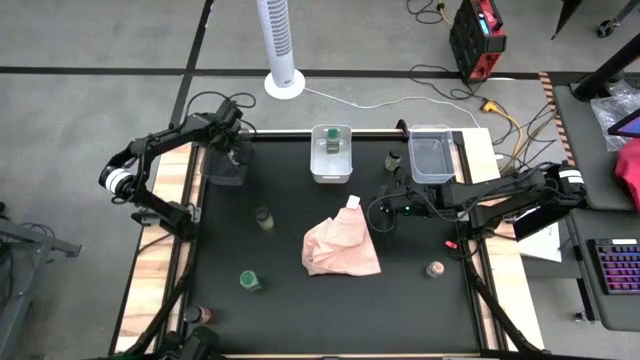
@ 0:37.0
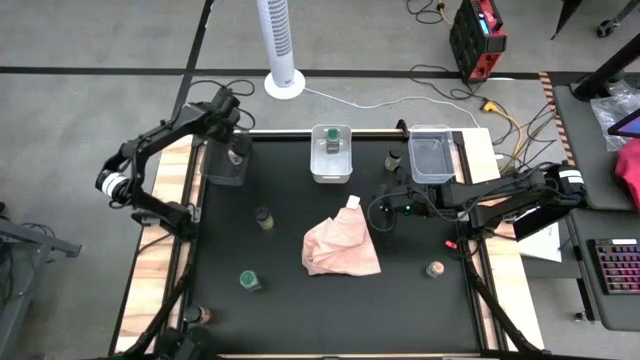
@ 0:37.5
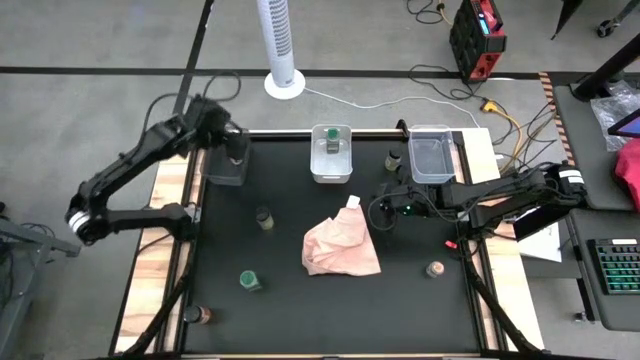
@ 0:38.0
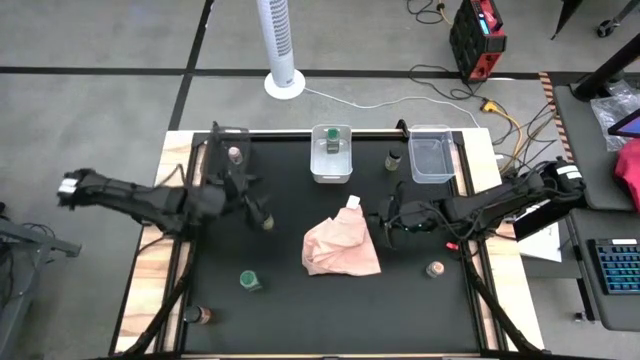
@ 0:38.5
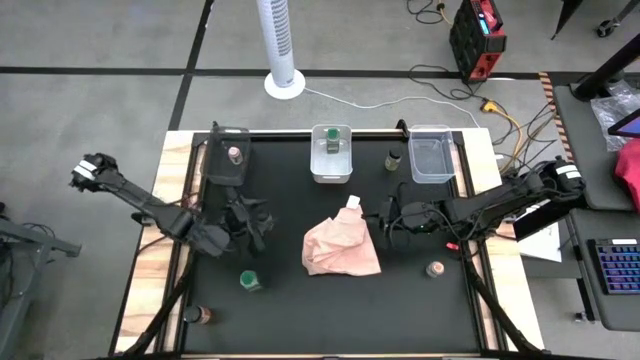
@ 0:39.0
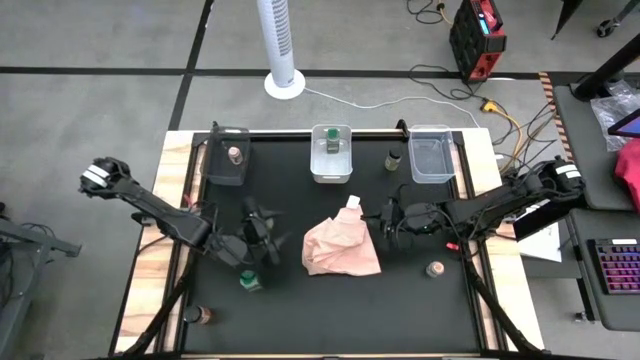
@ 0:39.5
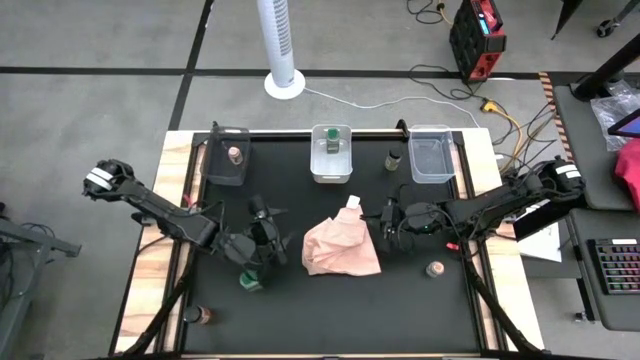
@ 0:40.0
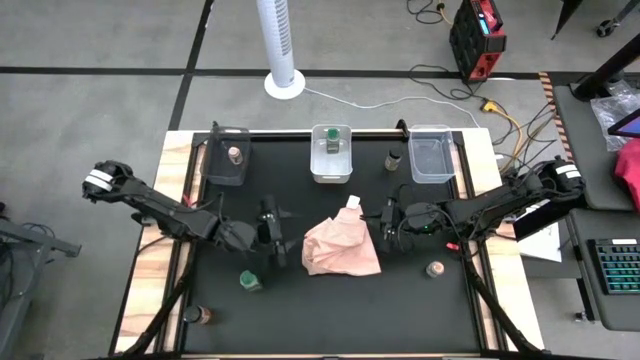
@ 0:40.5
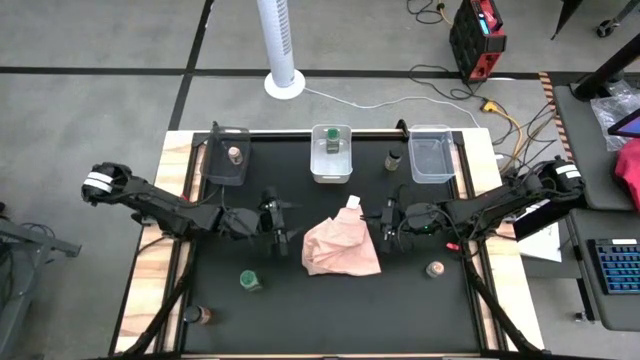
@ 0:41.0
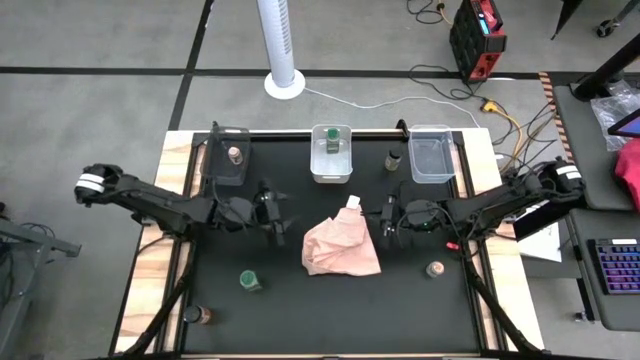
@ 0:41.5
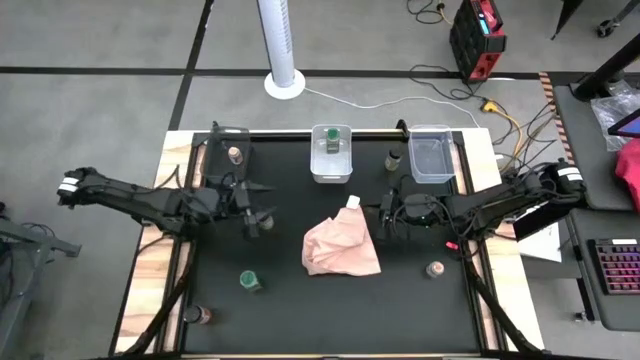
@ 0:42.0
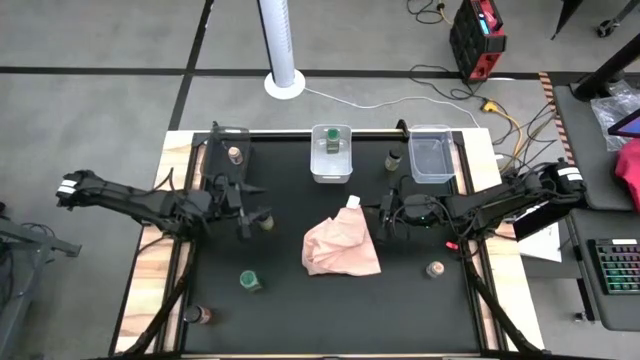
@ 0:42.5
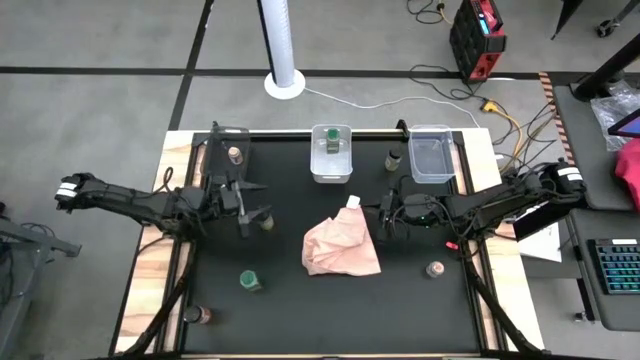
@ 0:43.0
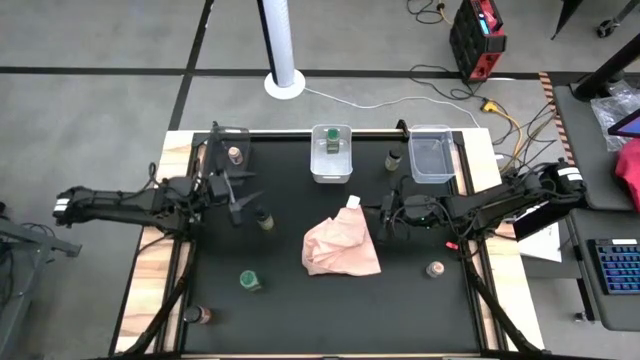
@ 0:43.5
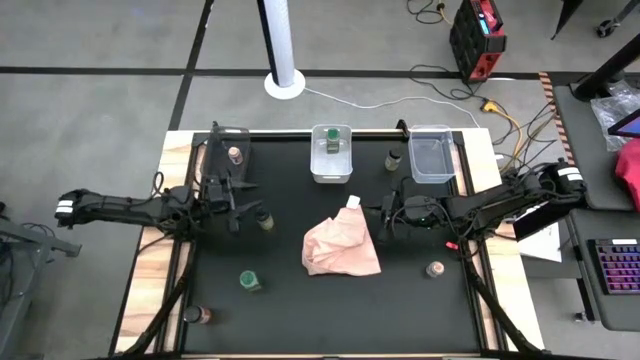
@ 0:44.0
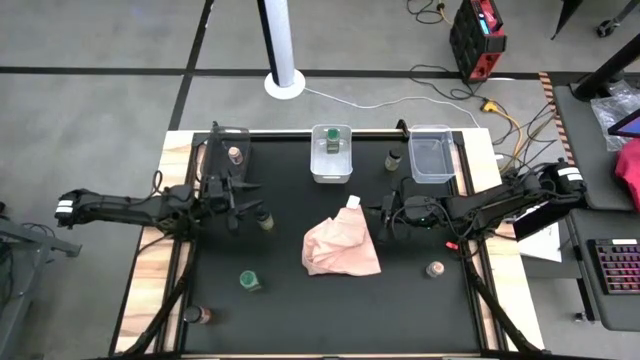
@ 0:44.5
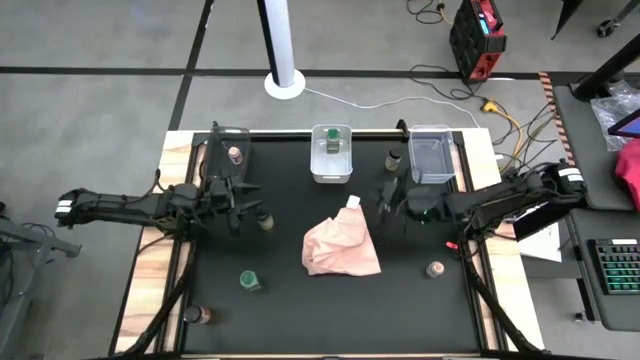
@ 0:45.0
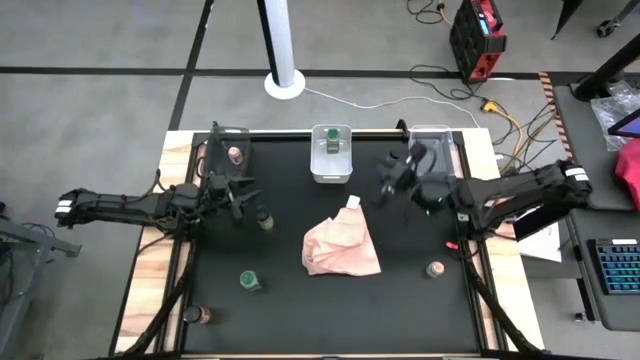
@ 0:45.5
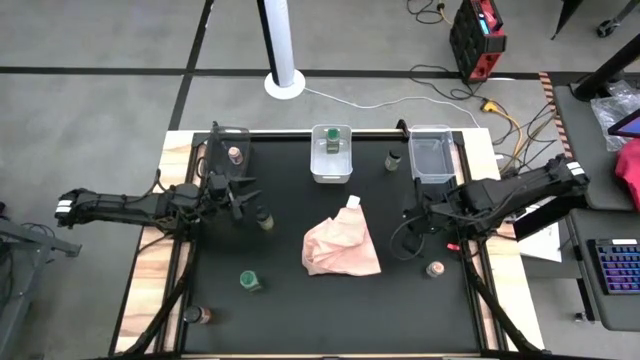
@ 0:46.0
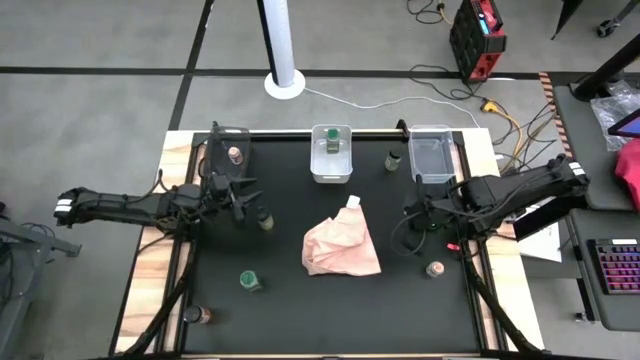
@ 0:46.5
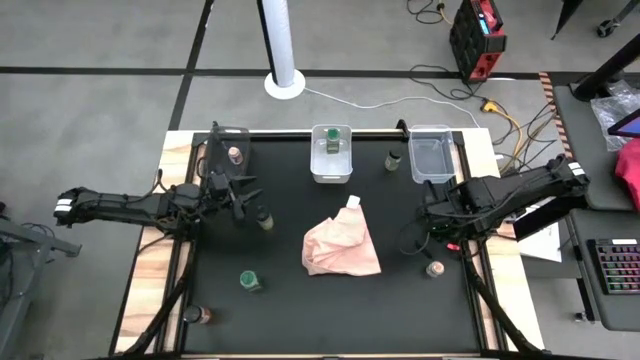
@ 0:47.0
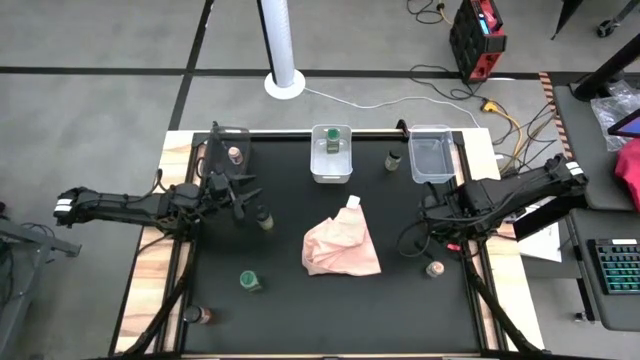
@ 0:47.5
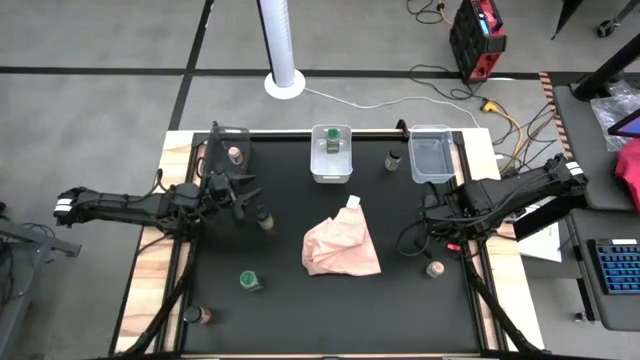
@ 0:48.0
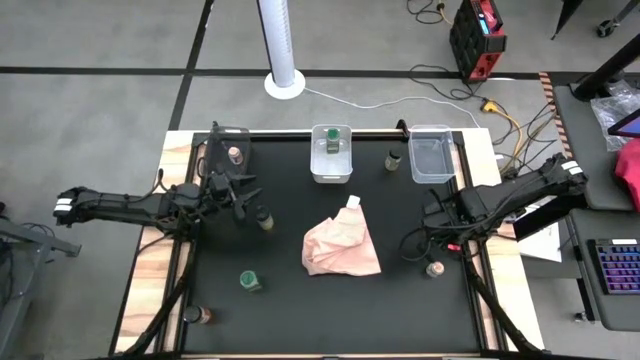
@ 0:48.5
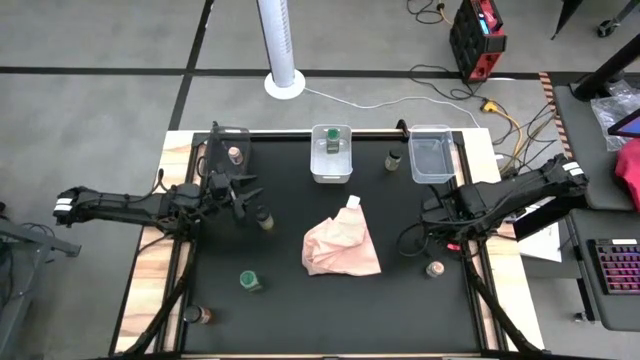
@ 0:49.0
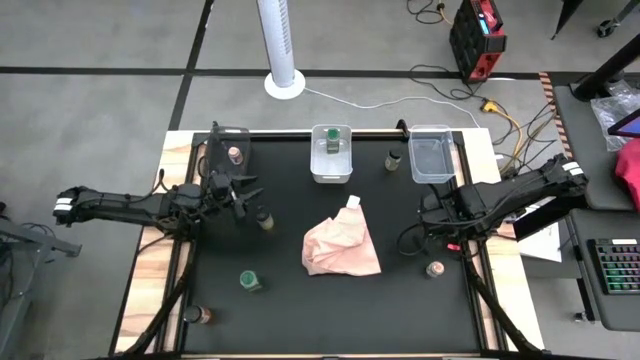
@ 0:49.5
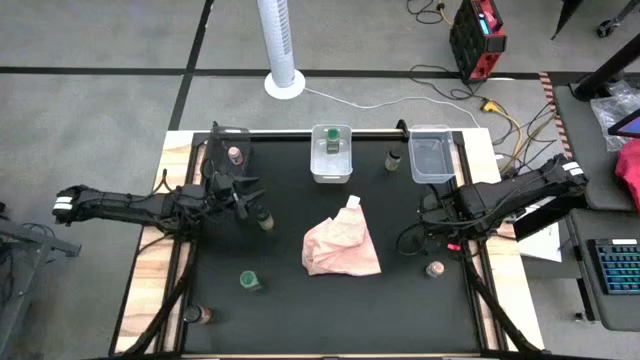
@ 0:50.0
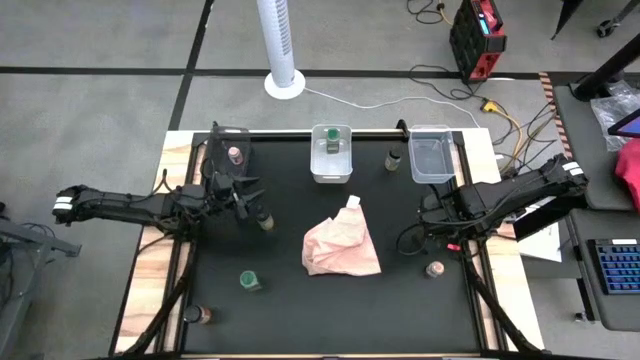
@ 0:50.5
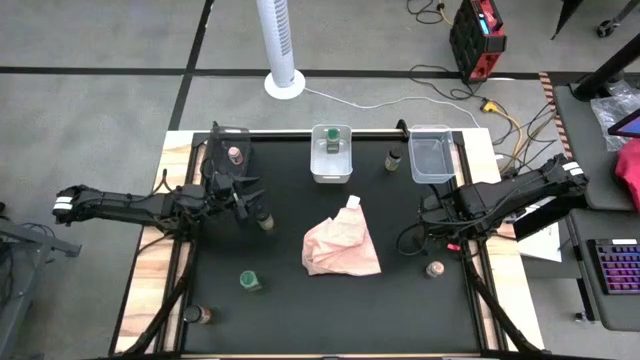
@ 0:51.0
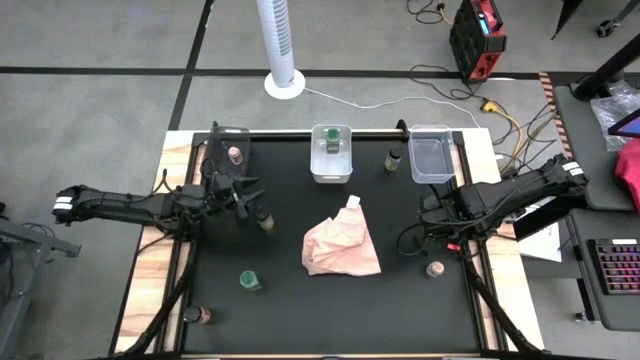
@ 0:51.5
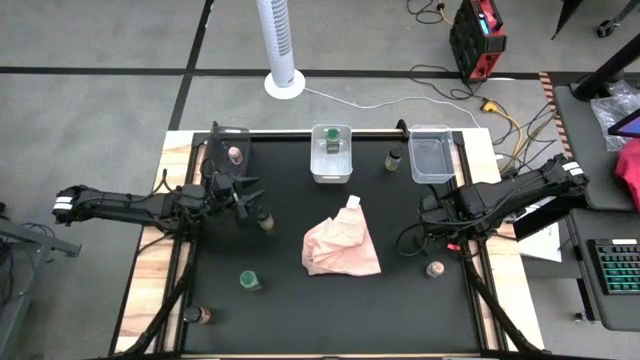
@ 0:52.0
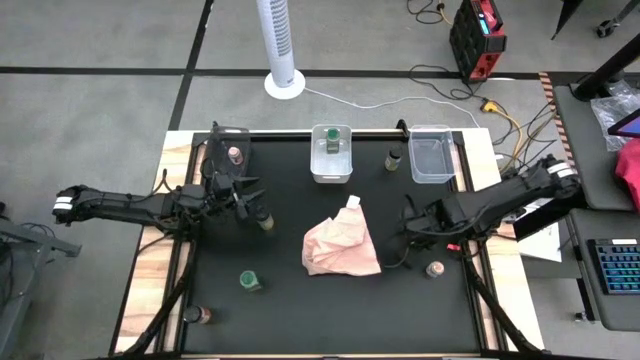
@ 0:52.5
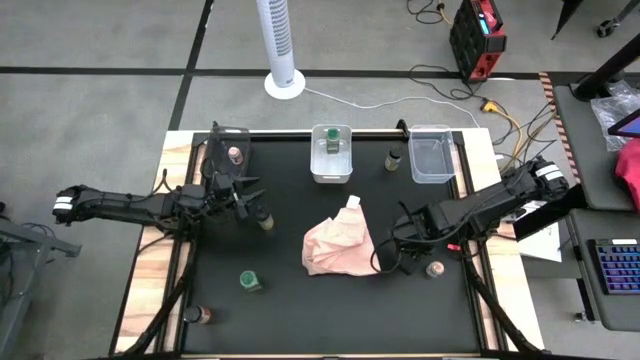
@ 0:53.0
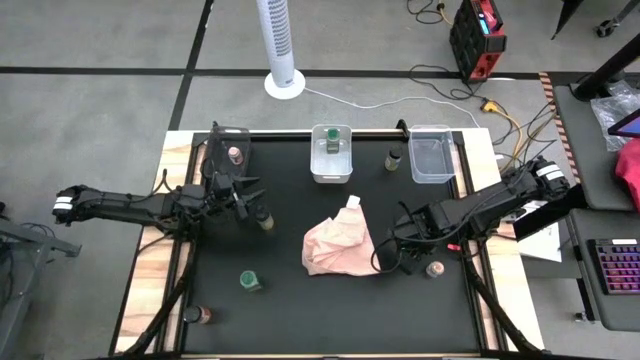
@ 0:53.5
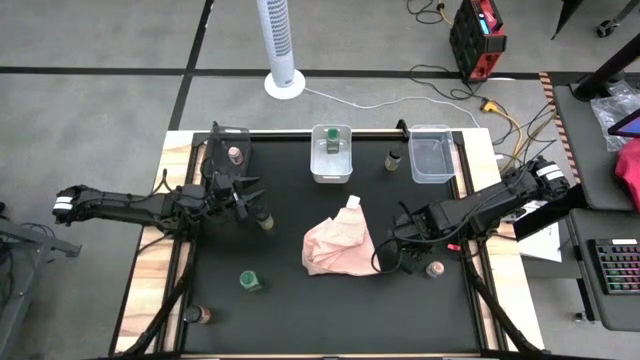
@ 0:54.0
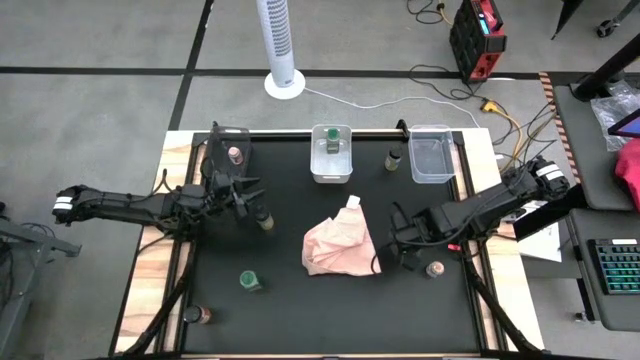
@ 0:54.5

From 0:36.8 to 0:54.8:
Task: Sort spices by type
Put the left black spice bottle into the transparent bin
